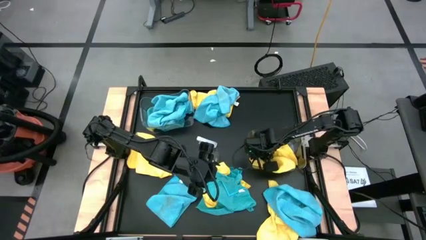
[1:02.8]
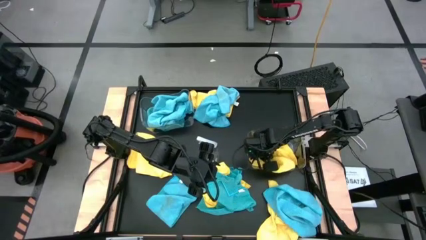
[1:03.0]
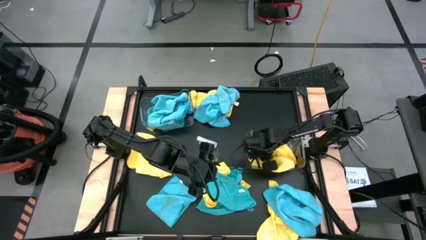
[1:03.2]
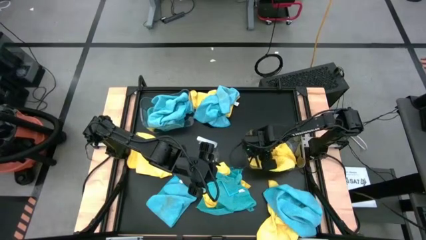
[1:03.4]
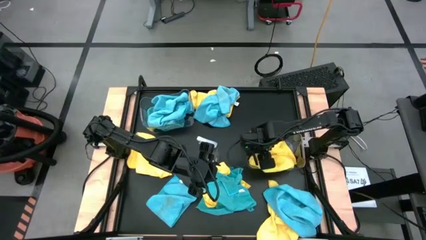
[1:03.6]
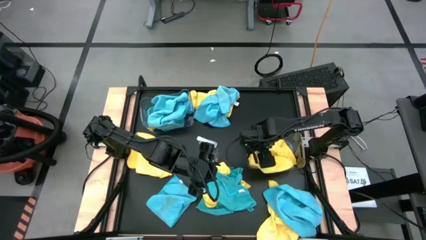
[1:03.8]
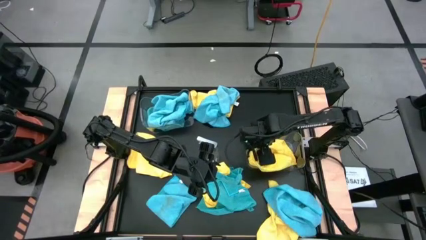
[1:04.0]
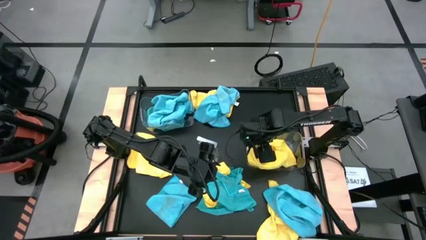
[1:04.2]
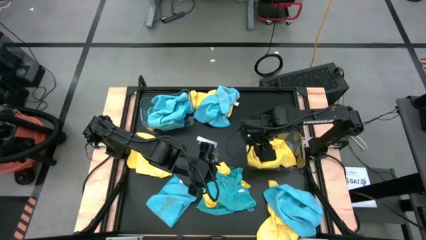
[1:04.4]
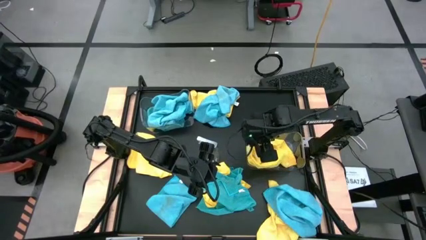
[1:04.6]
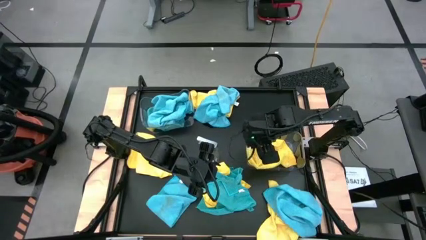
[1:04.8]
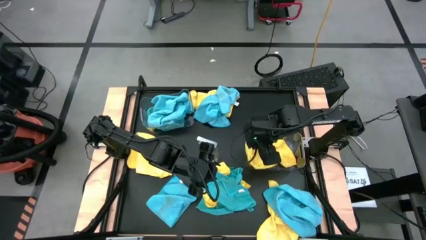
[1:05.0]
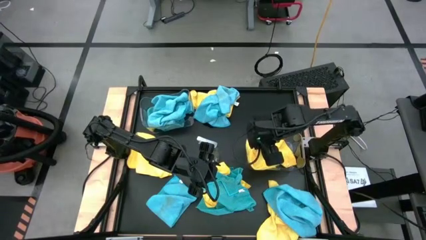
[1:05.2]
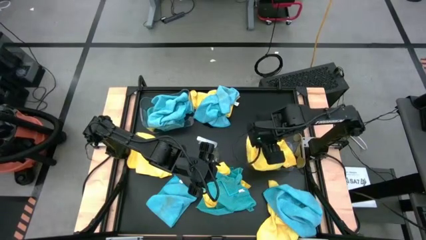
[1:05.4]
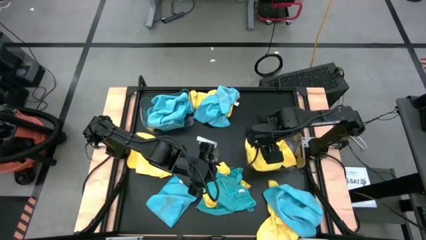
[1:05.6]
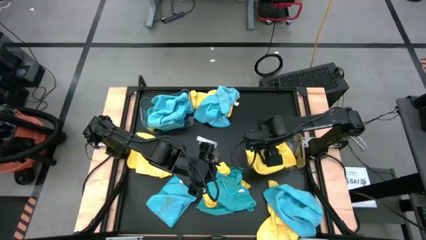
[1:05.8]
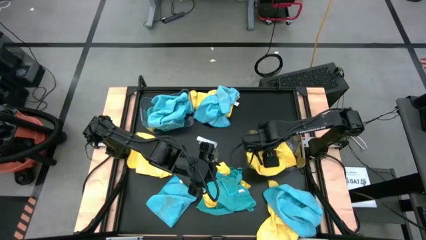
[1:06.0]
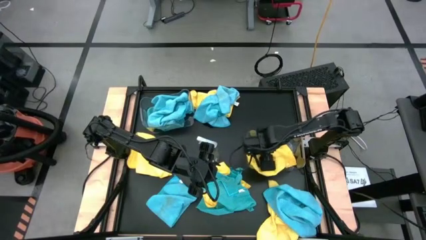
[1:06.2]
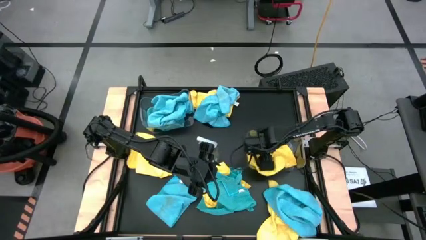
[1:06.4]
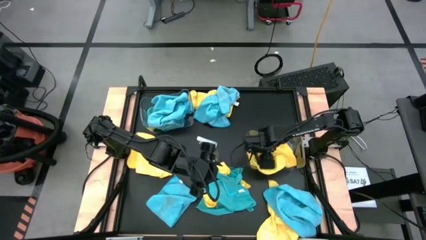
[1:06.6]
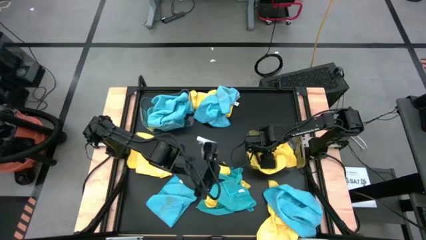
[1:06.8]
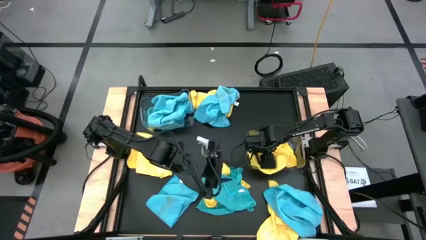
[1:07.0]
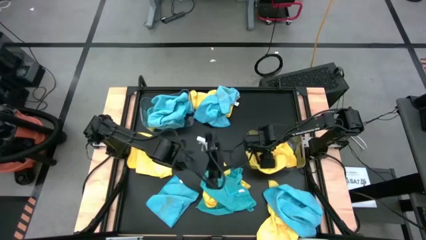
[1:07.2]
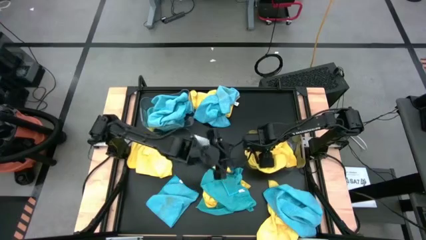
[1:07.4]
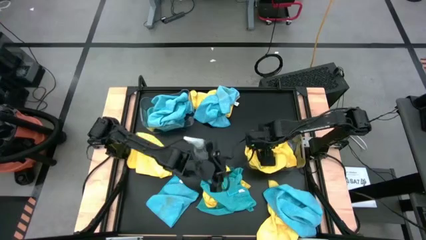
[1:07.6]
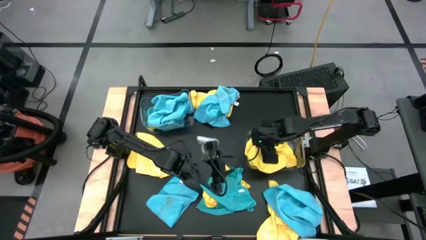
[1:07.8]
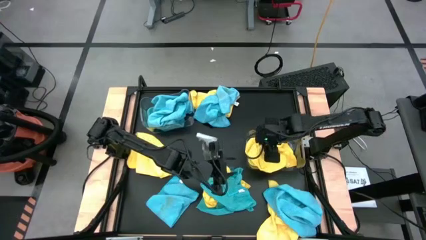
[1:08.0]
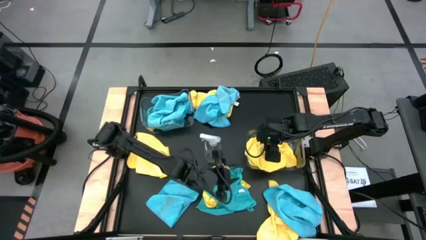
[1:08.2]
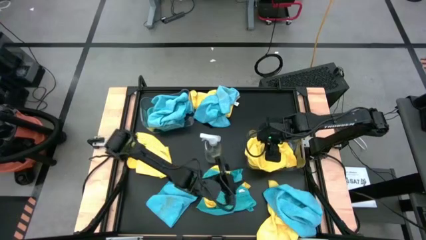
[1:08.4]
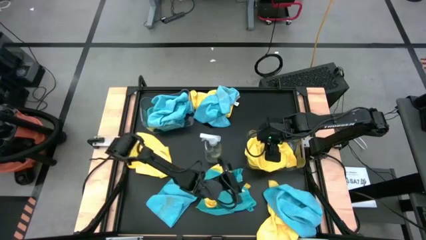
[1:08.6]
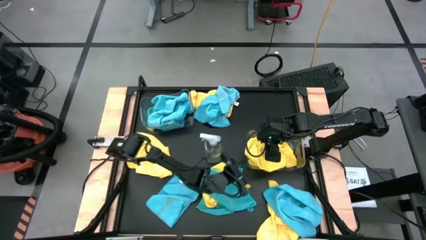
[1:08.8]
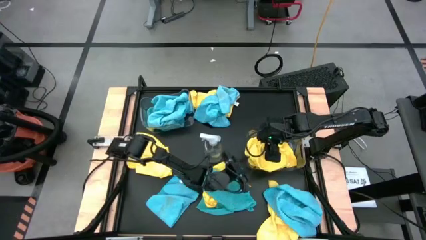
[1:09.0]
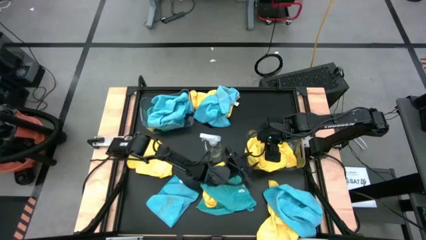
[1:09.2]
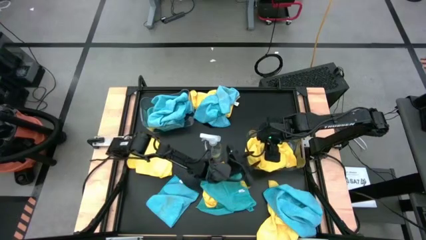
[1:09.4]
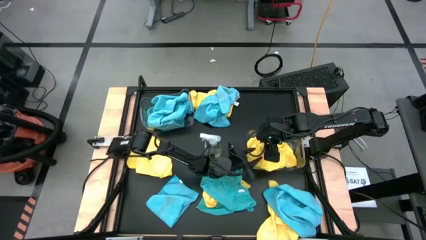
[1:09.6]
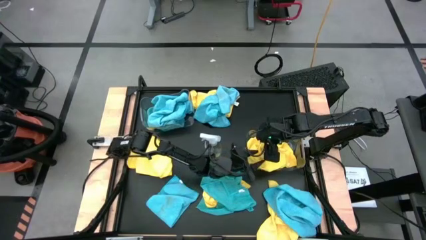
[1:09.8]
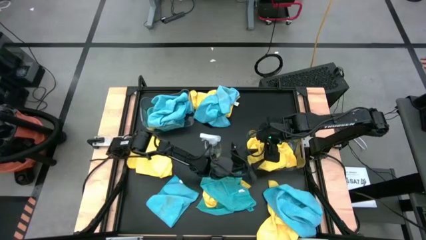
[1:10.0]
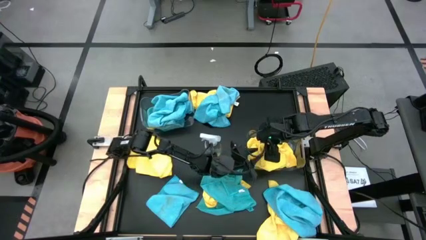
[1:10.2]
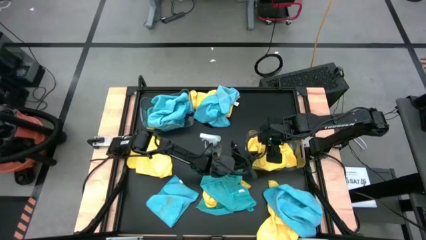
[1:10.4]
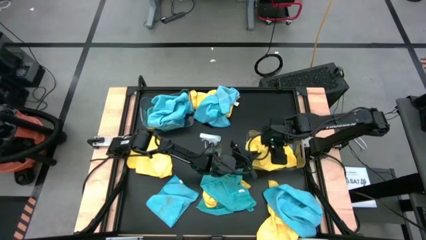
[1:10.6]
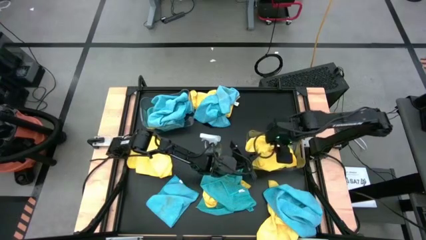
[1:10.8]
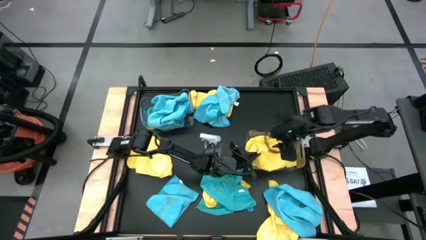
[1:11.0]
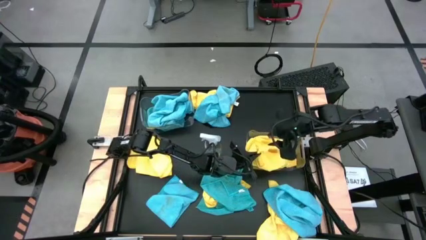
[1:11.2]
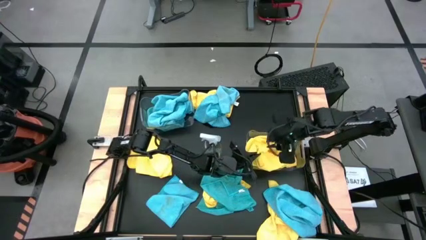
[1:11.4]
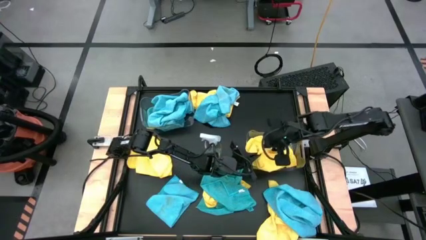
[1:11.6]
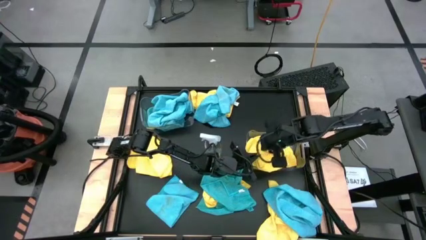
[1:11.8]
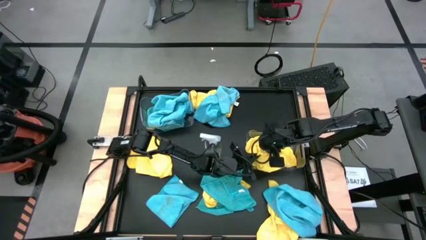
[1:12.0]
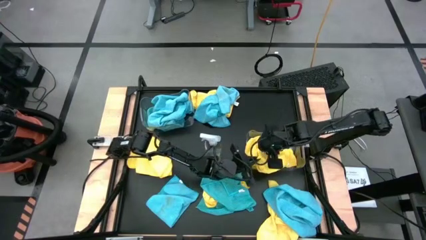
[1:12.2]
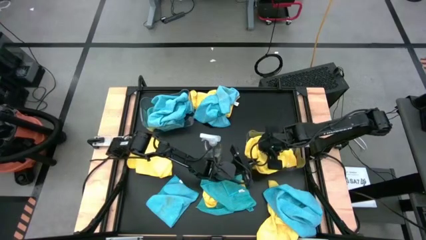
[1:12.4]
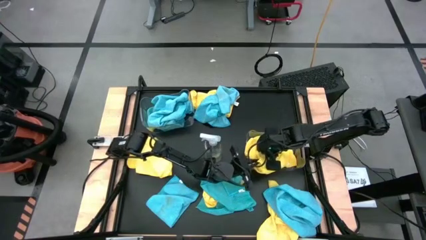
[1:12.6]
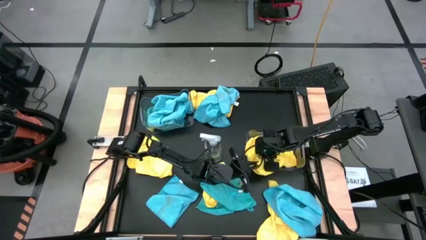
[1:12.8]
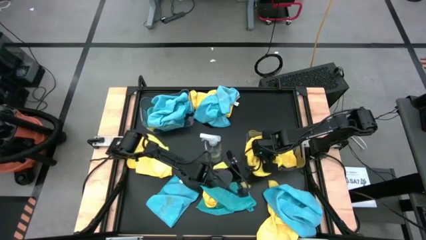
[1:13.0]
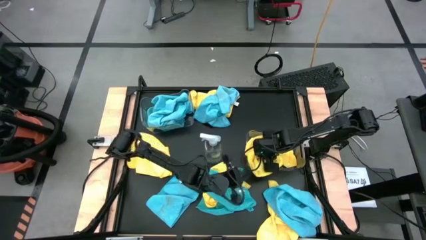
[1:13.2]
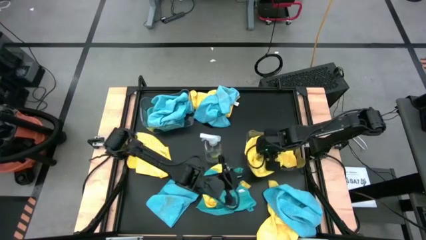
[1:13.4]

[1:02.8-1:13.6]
Task: Sort microfiber towel by color & place in baskets
Put the yellow microfiber towel into the bottom transparent bin
